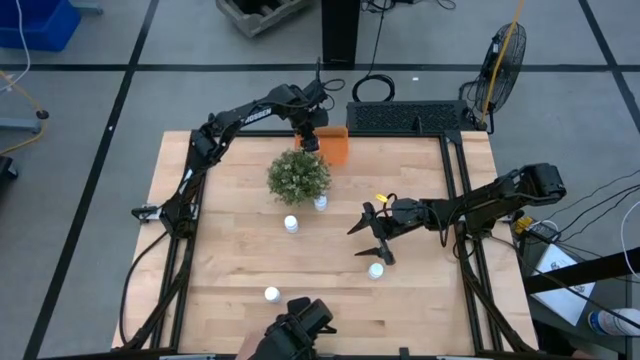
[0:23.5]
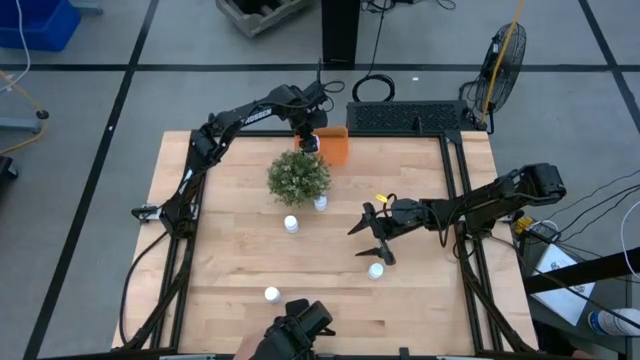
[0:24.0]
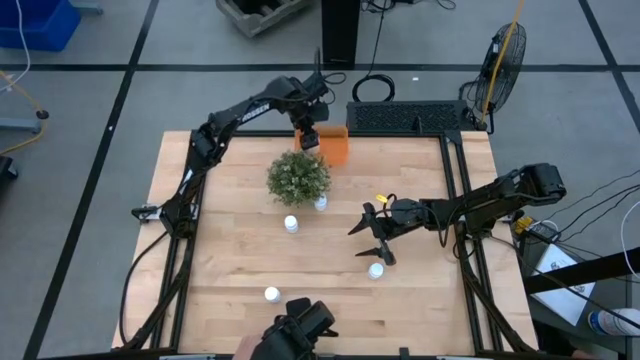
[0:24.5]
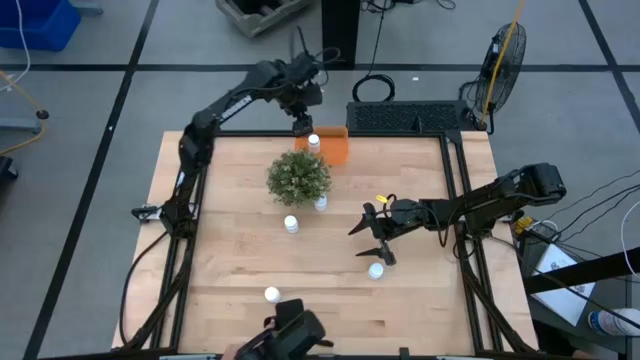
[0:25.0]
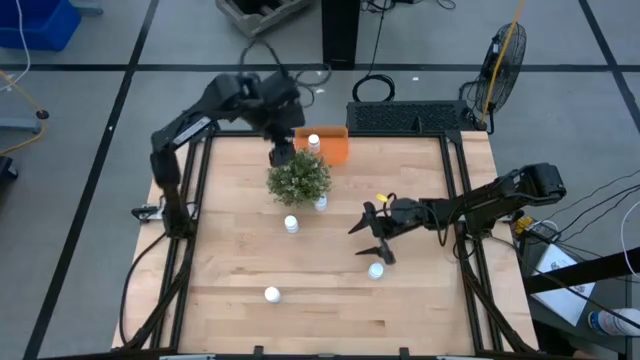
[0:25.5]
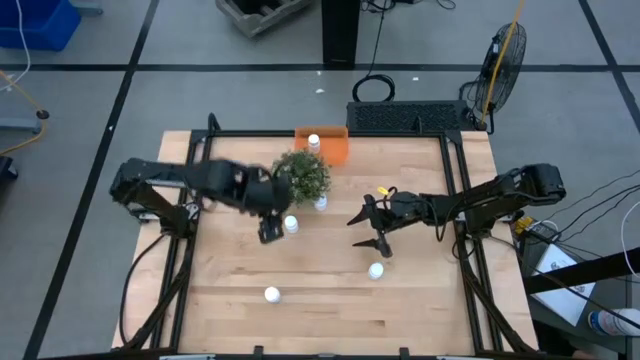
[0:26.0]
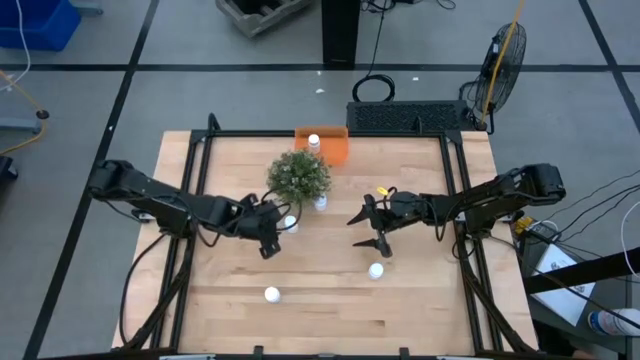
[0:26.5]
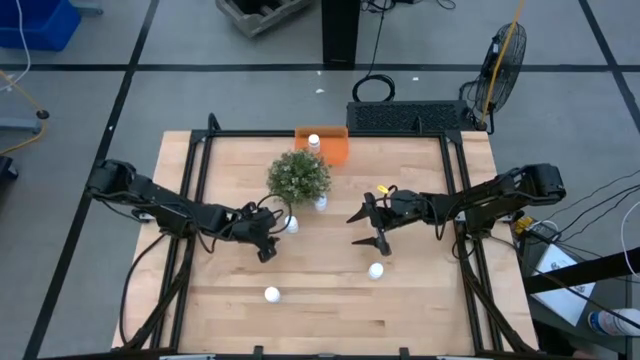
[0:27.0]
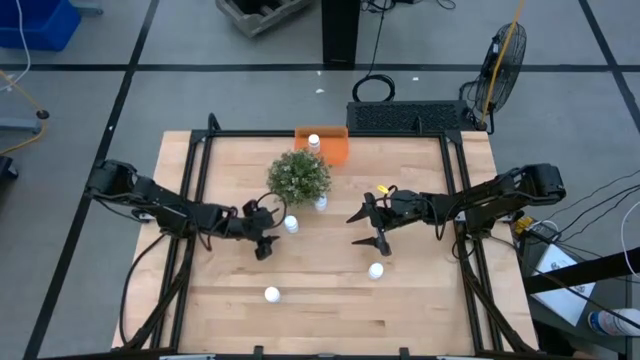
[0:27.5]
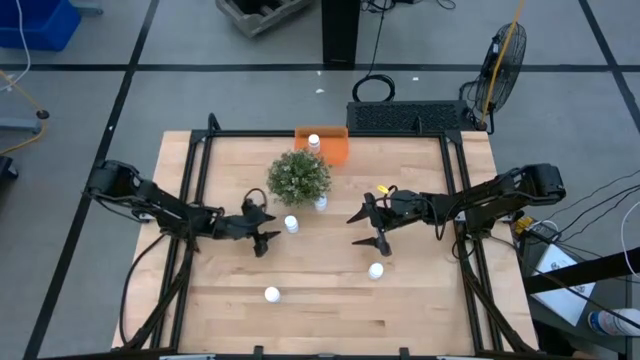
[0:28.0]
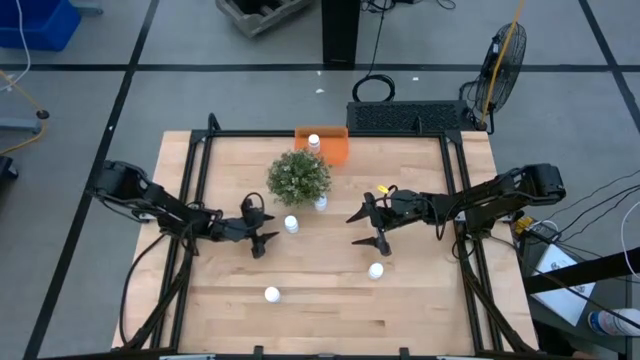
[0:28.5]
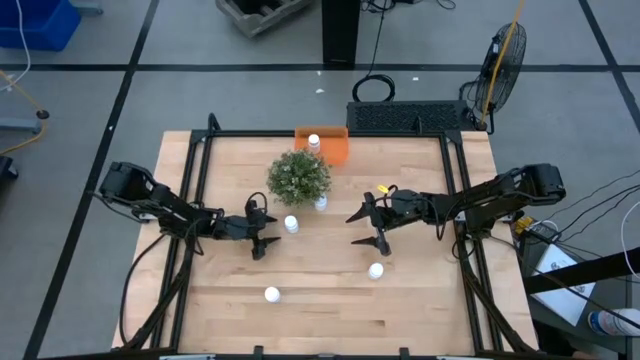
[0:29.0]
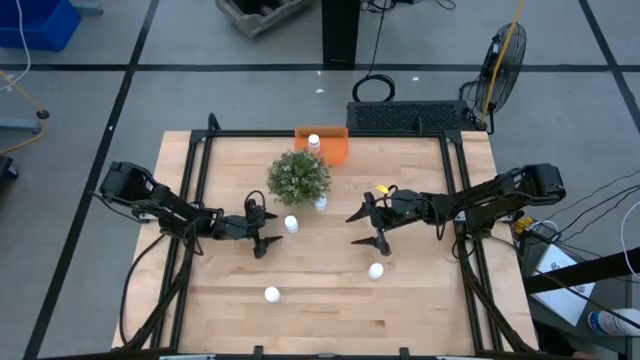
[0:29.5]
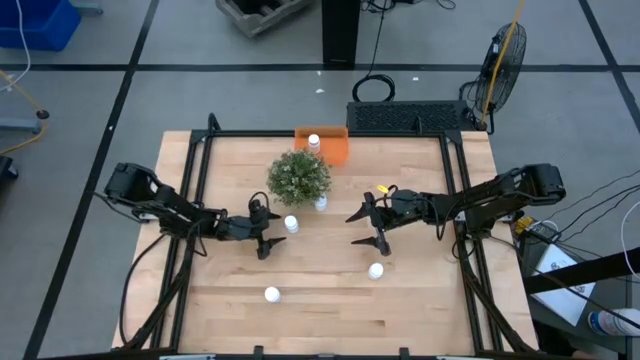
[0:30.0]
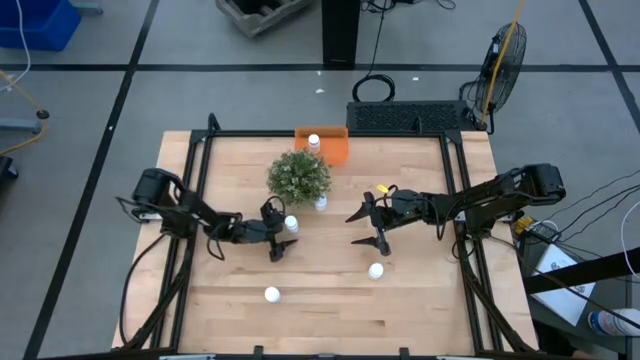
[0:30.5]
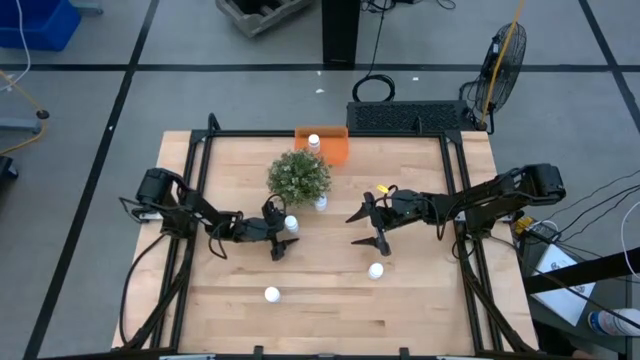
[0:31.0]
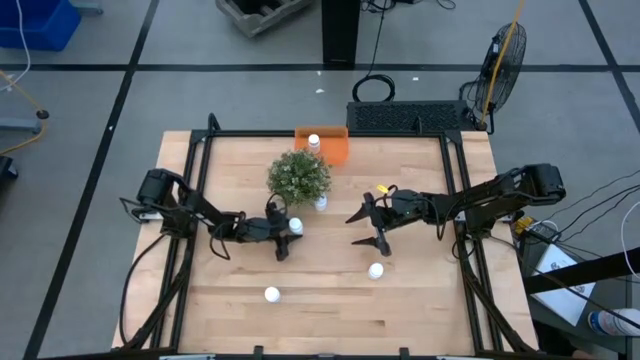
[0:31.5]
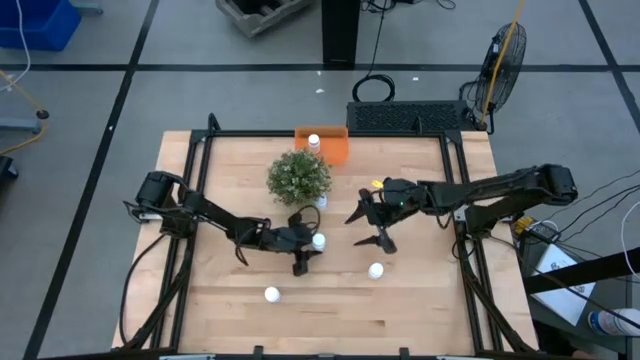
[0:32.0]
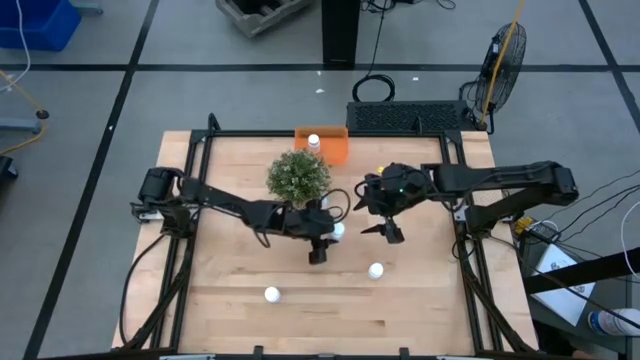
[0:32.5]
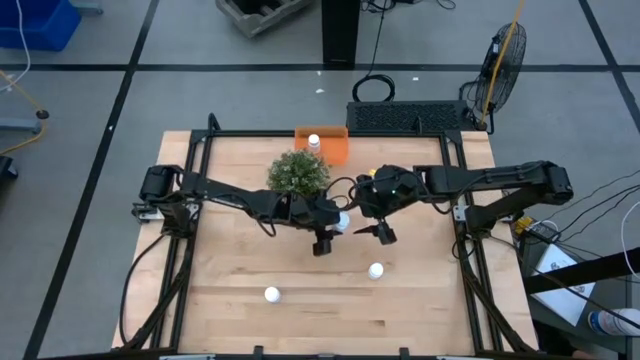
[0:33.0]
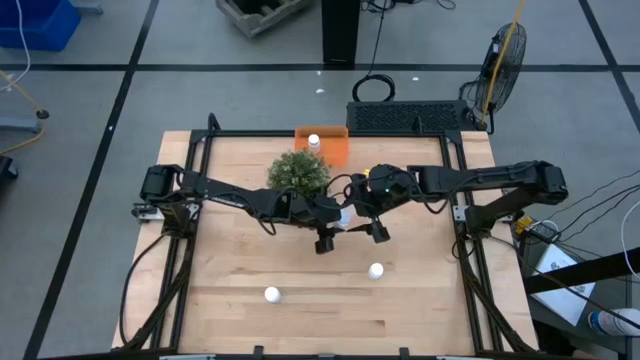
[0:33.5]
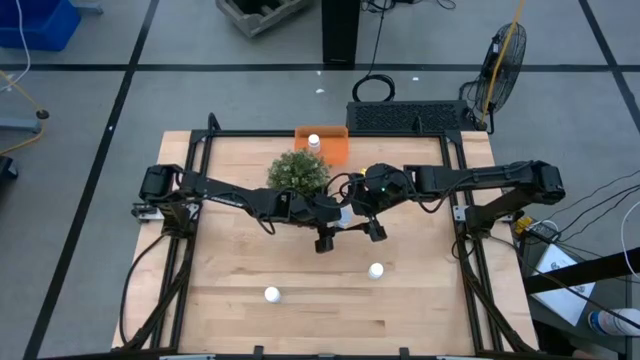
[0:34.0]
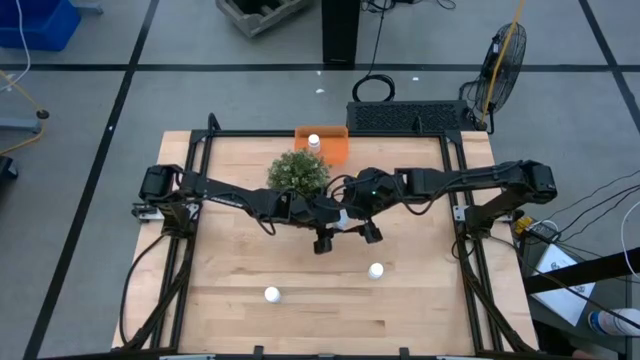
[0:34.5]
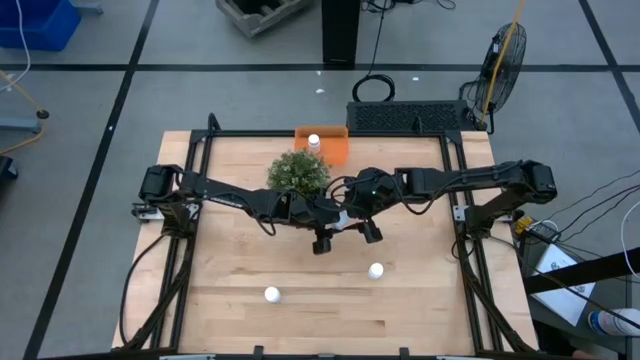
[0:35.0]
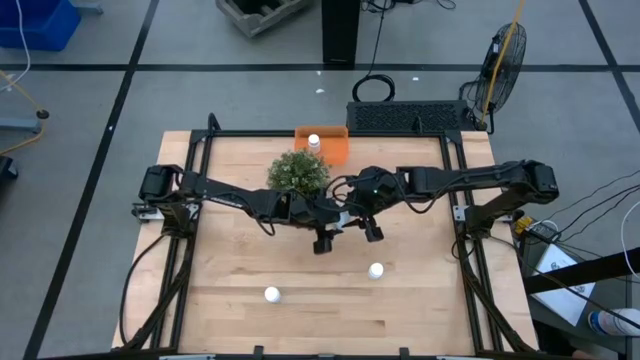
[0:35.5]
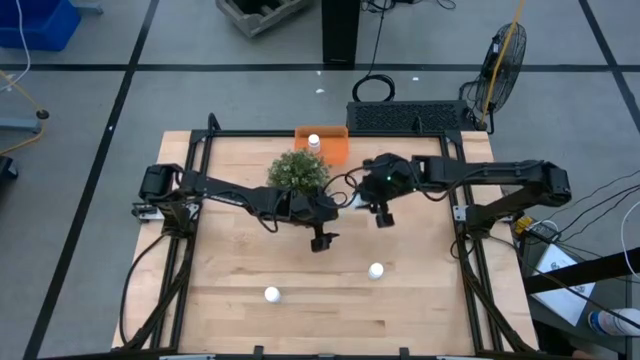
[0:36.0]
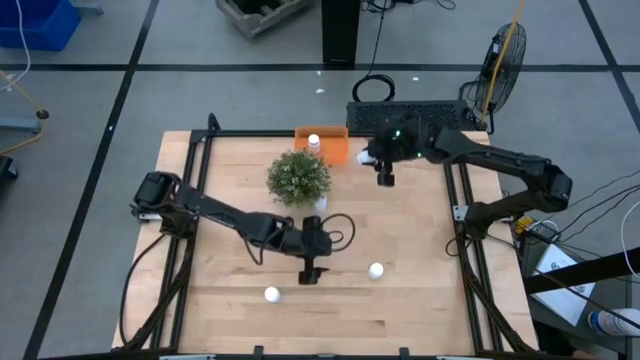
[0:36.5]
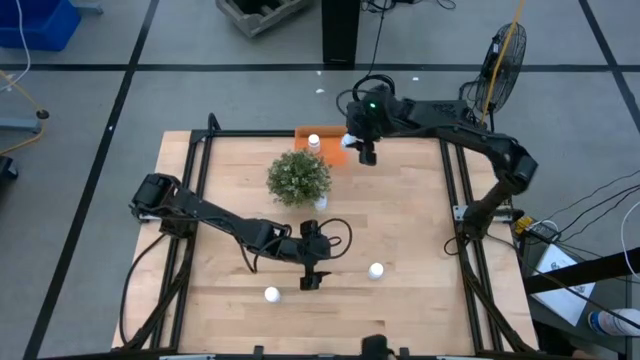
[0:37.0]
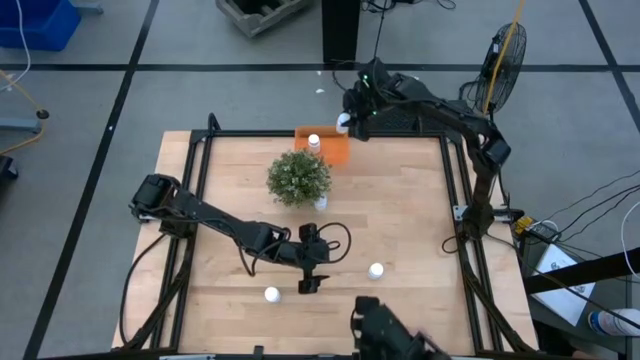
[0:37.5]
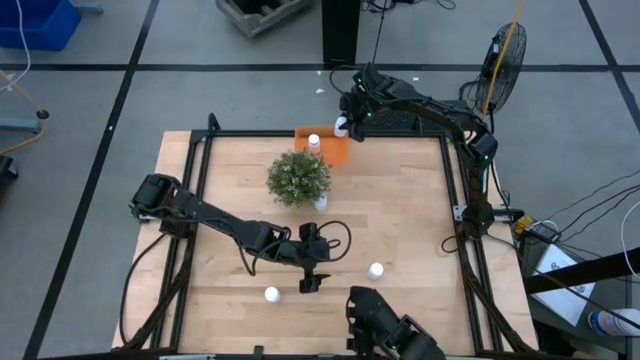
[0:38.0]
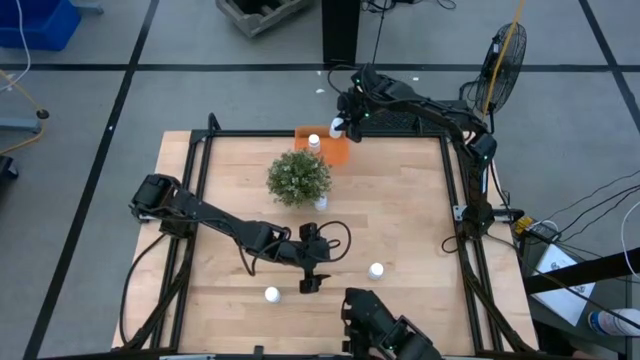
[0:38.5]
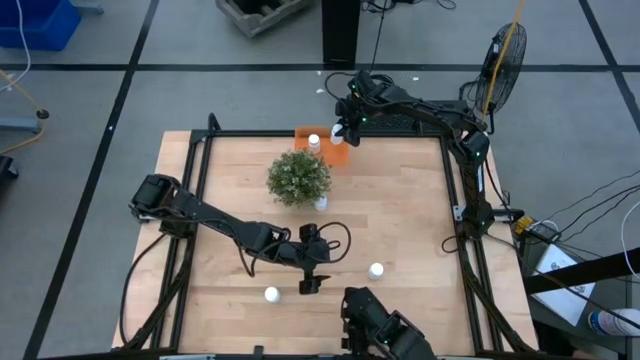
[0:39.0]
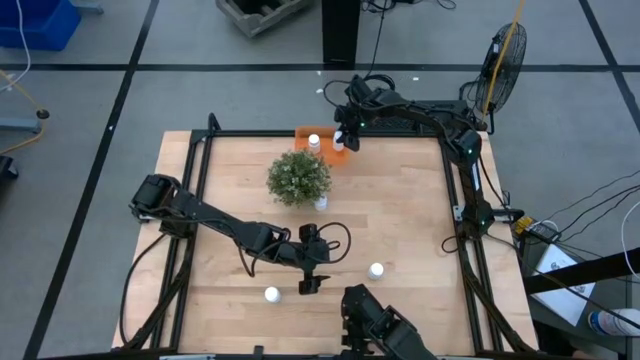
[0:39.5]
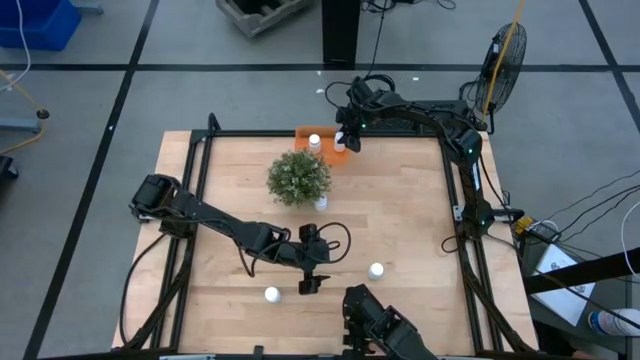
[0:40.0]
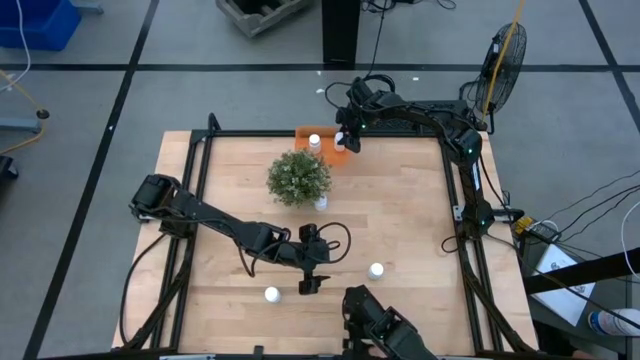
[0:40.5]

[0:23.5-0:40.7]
Task: Pick and place pill bottles into a basket
Put the white pill bottle into the orange bin
